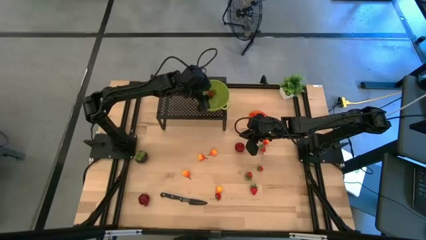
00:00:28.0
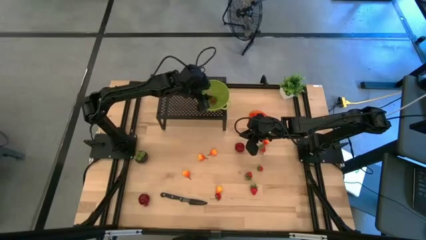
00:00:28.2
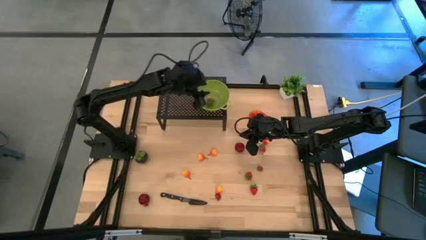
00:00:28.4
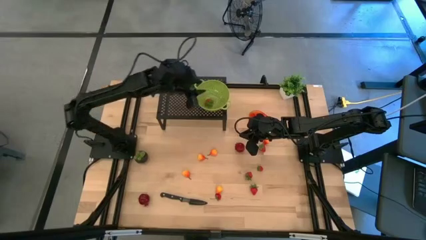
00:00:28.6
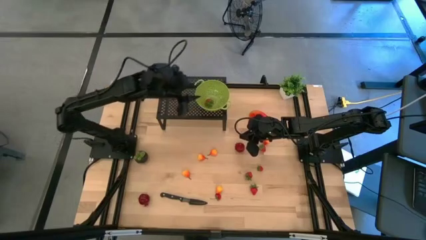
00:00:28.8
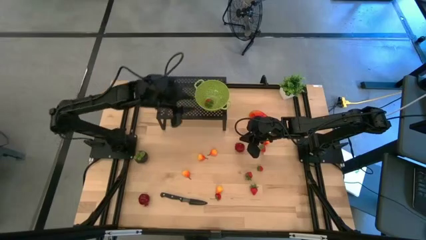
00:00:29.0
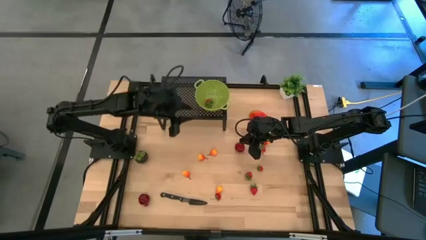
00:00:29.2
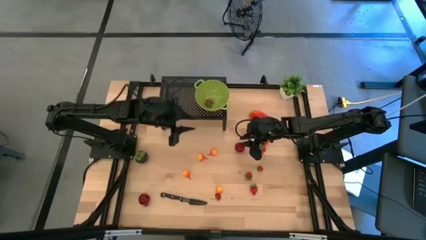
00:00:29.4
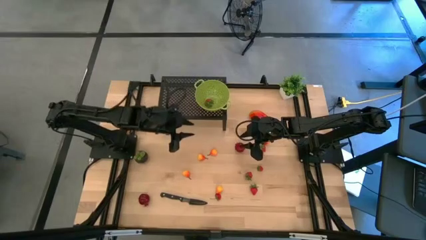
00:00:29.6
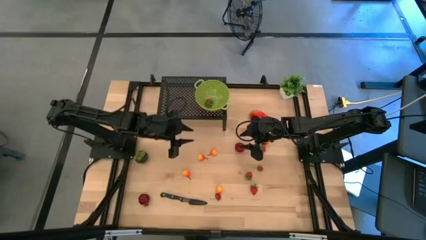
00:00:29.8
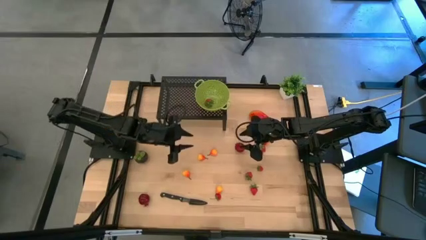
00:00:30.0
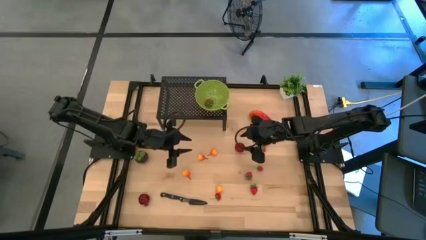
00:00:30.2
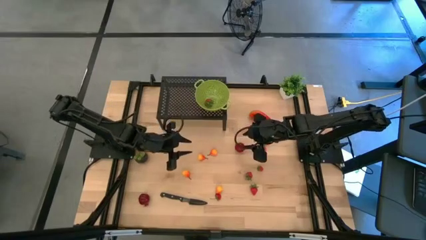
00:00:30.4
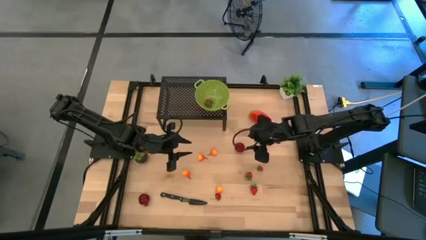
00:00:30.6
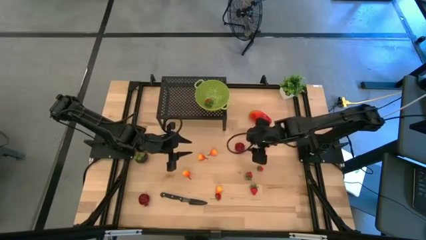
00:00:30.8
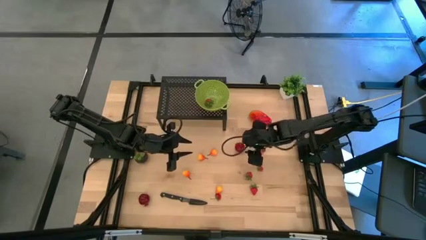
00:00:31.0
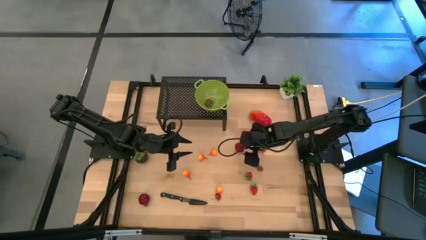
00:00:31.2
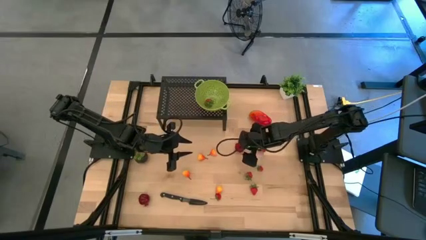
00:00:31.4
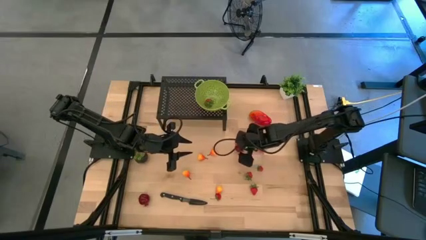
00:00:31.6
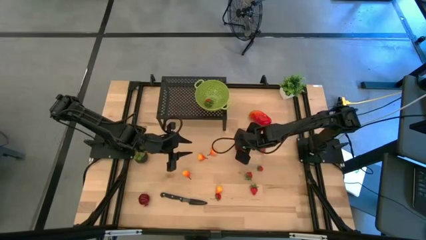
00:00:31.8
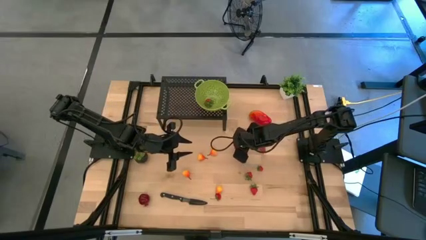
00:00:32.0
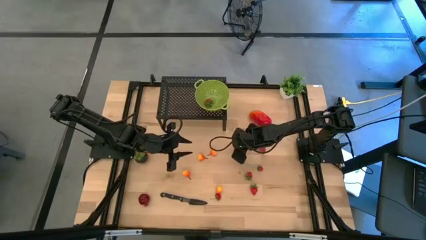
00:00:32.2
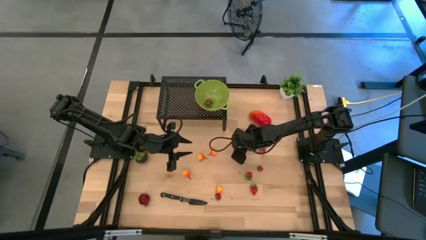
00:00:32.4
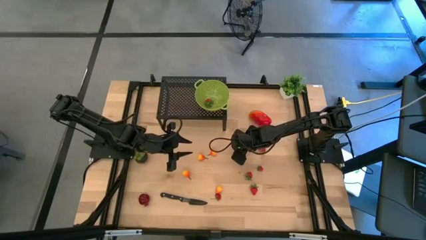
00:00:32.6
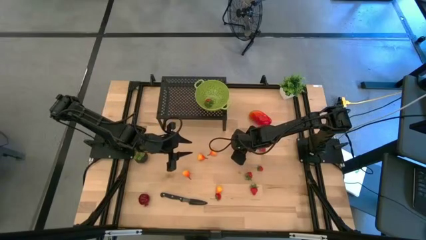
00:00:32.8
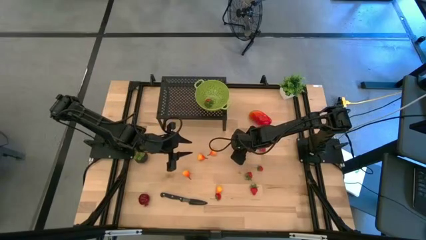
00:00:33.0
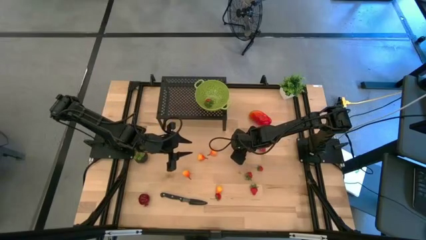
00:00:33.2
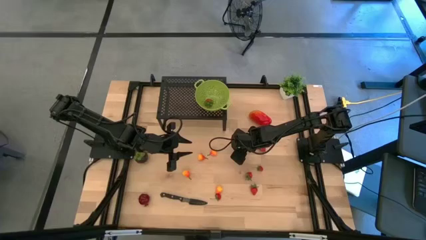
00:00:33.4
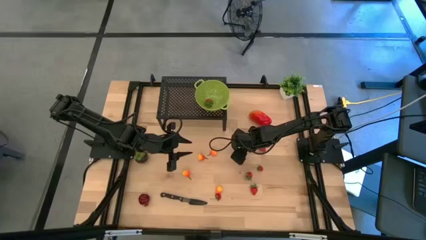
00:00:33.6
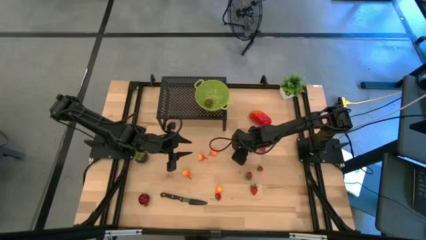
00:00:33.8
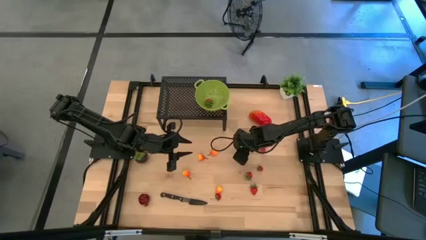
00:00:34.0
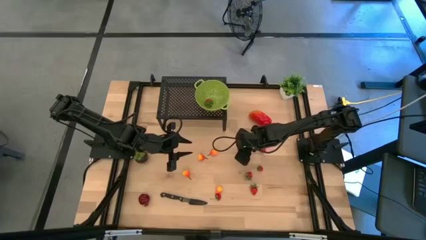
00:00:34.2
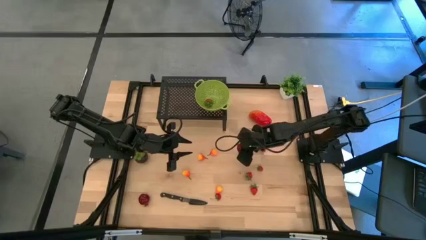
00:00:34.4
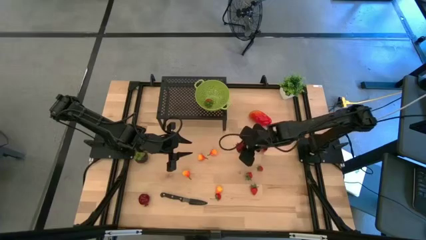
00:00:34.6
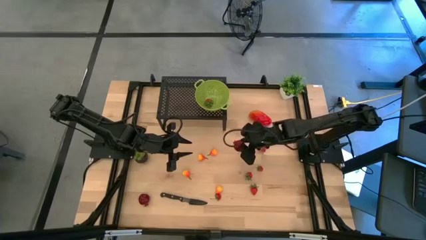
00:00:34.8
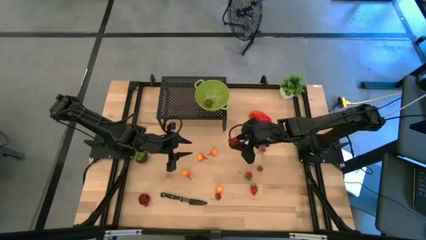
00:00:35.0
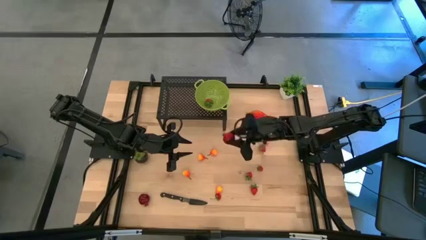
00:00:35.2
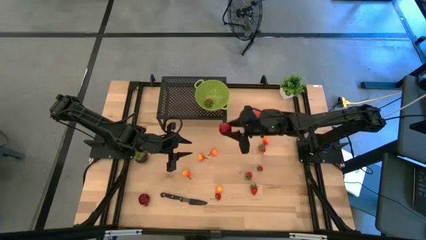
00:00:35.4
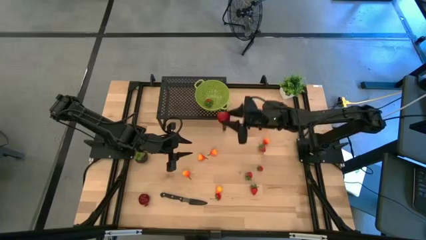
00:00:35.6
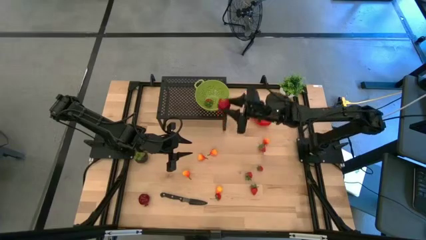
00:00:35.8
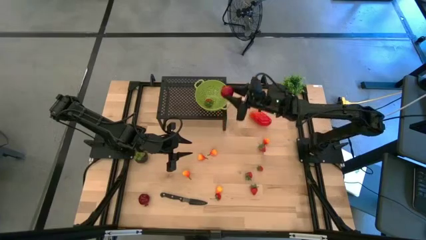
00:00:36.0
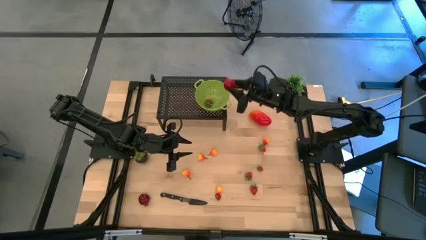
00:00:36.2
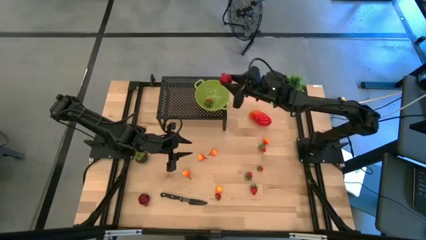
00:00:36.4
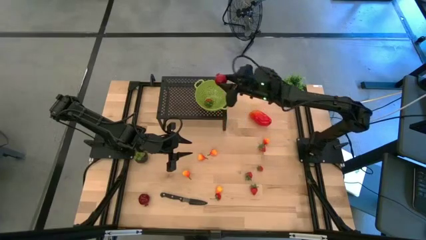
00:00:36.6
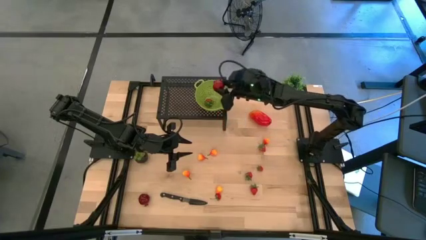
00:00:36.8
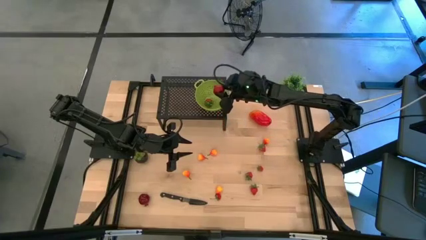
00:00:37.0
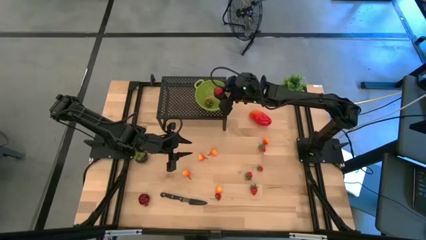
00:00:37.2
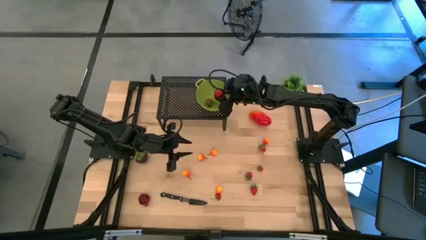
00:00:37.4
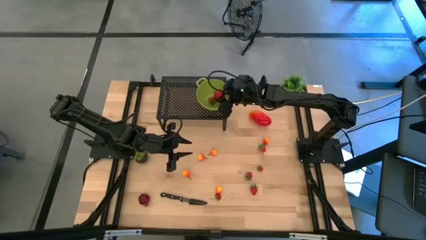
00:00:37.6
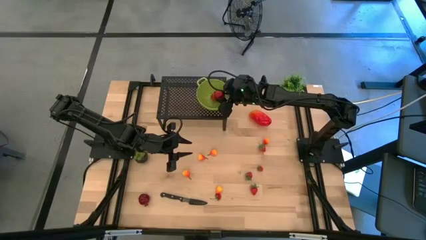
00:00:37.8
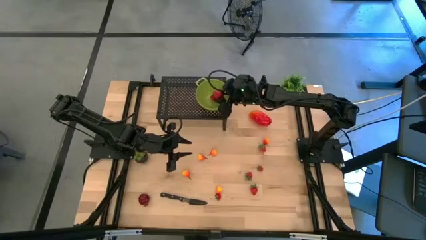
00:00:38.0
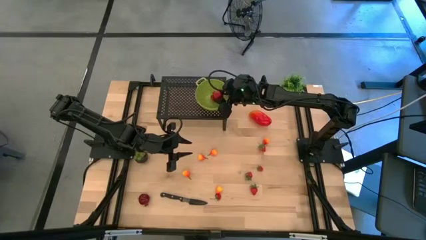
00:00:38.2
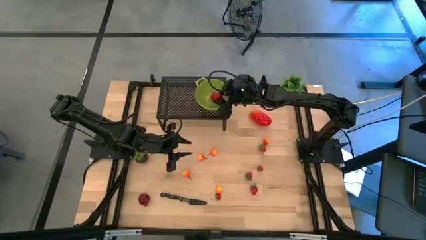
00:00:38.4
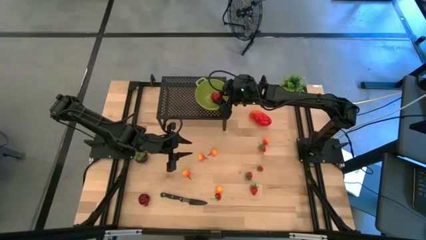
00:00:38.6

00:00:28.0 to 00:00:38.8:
Task: Pick & Place Fruit
Put the pomegranate into the green strainer bowl on the shelf

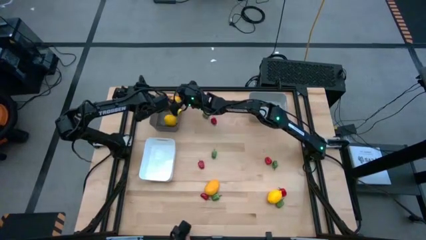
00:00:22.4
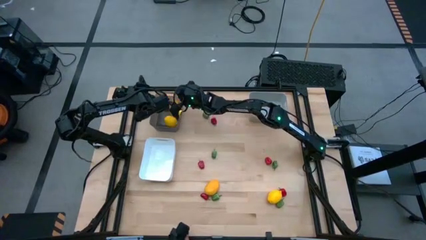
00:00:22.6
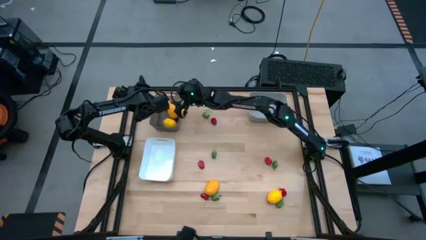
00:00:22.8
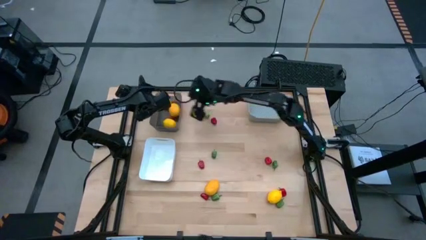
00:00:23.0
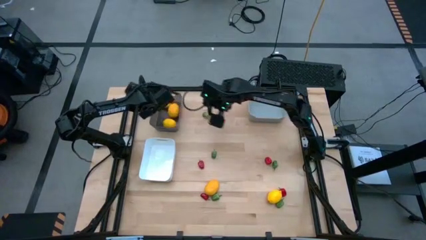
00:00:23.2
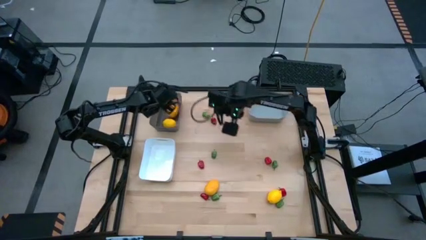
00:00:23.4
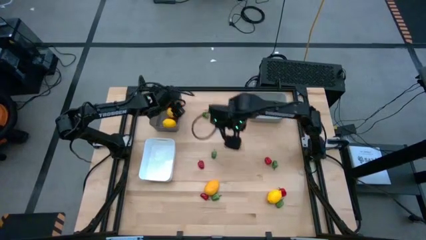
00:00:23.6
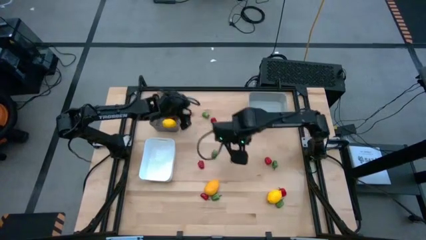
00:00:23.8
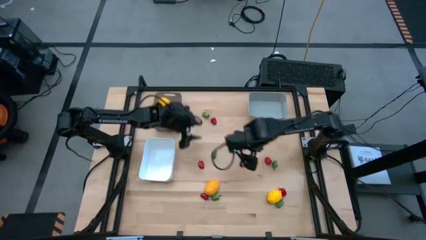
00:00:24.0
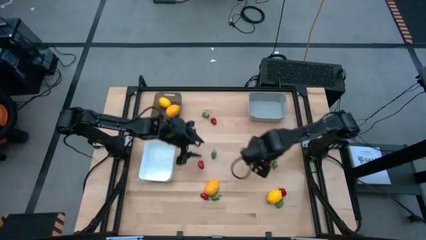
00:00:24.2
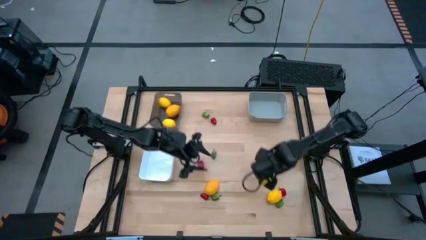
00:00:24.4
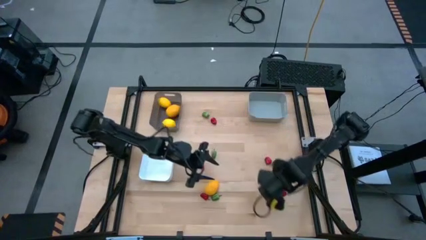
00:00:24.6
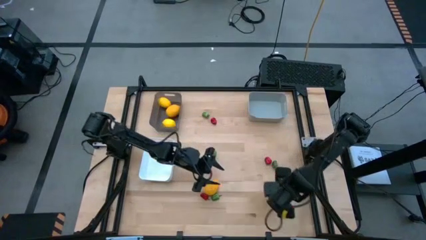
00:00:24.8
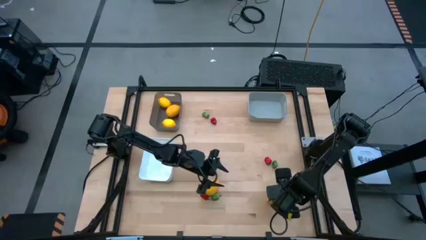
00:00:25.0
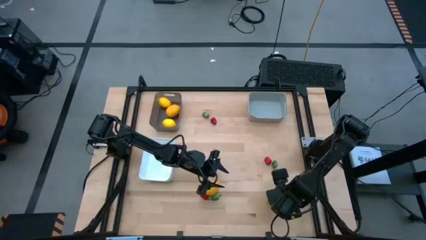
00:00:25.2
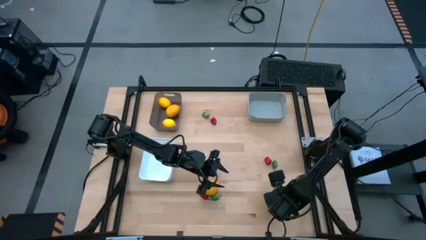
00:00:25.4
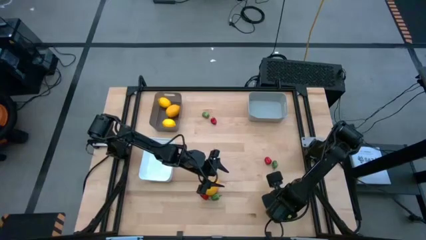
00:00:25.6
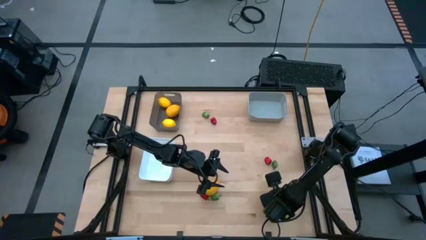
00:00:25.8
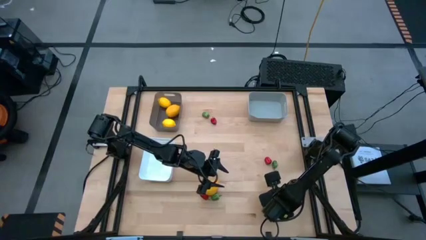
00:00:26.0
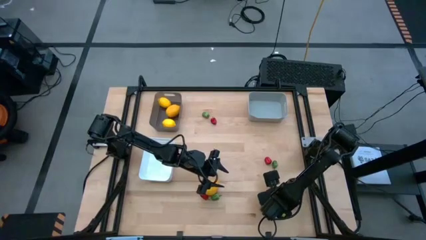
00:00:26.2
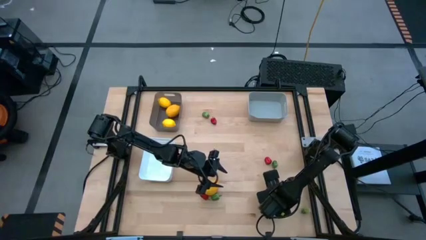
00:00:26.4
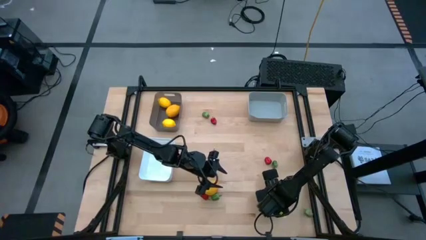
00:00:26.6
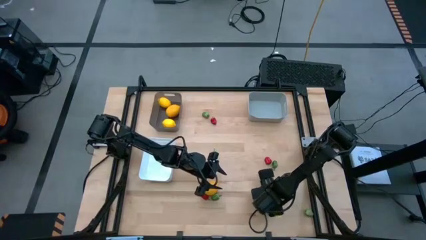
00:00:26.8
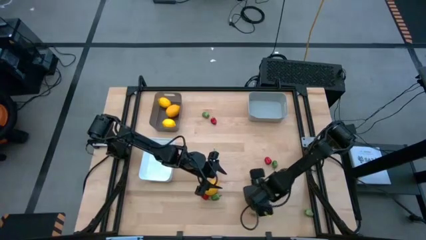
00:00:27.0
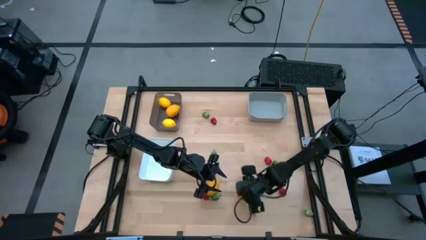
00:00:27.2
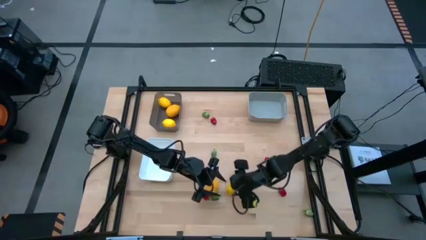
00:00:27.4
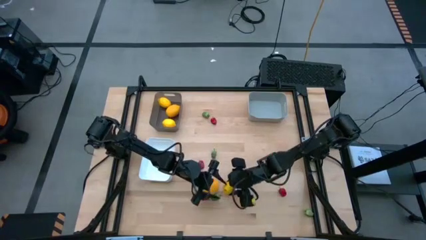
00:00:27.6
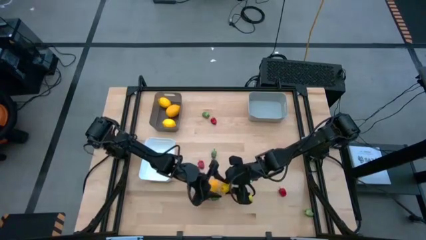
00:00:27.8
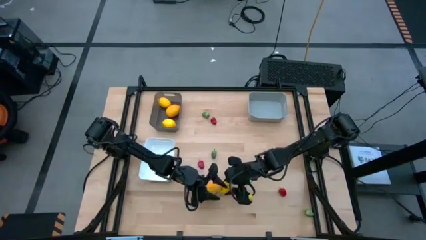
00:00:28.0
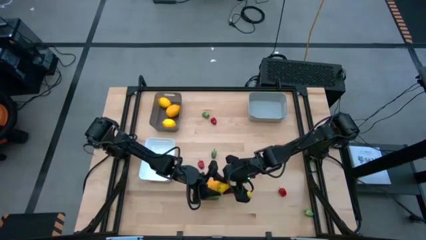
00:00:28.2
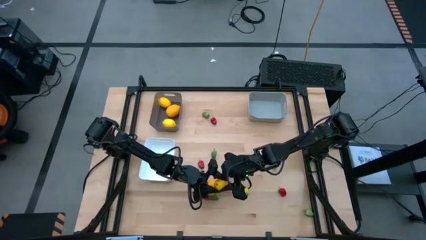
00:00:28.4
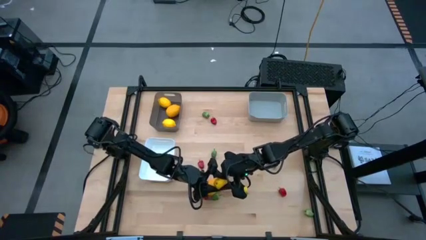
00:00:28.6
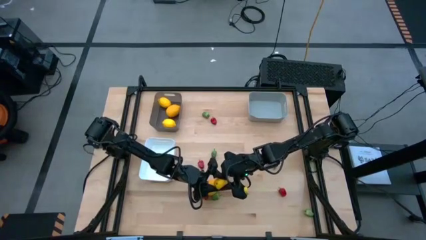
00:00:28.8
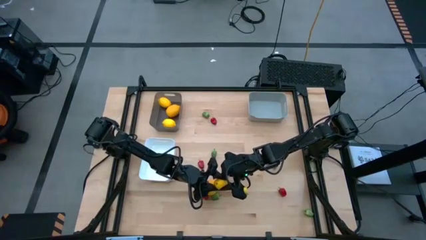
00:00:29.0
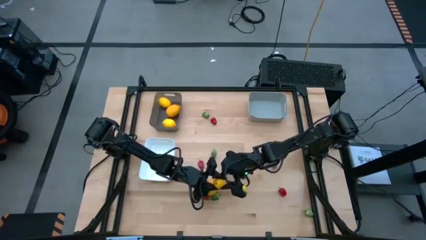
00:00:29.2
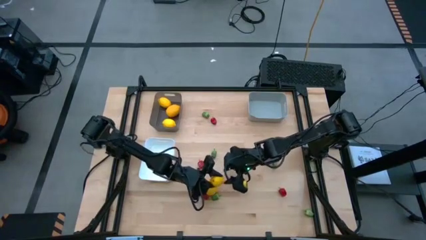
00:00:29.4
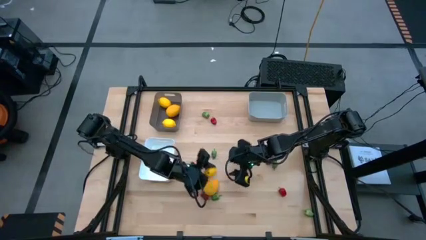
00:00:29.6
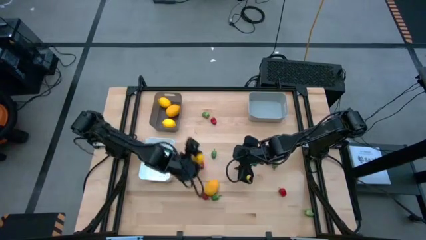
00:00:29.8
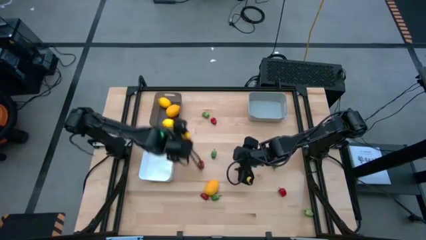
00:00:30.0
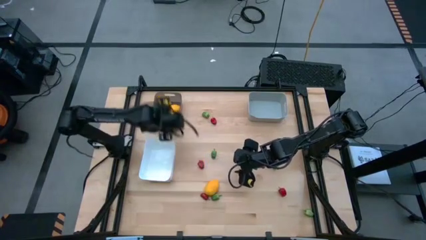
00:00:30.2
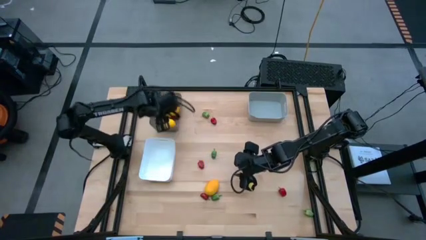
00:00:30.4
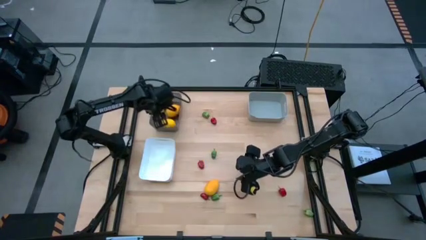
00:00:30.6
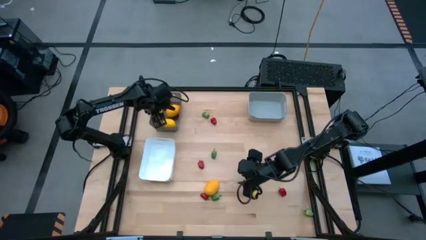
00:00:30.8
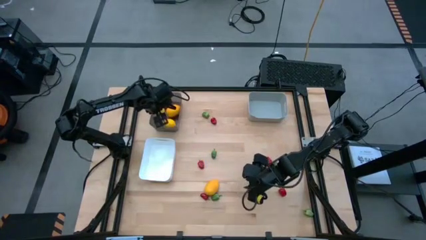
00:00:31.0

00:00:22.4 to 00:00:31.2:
Task: Sort produce into baskets
Put the right yellow lemon into the black bin
